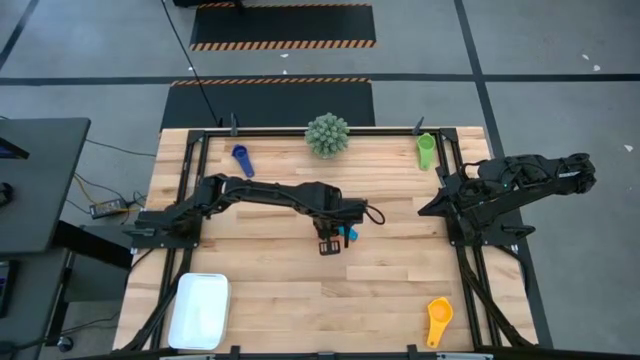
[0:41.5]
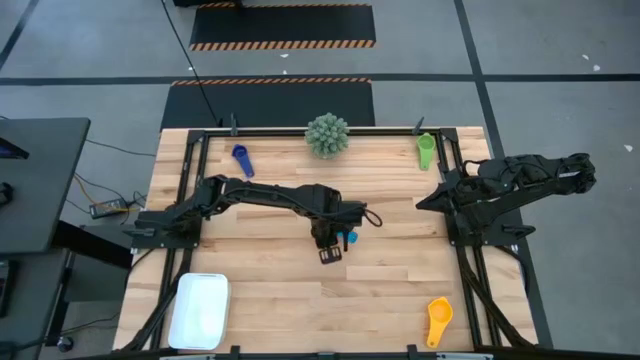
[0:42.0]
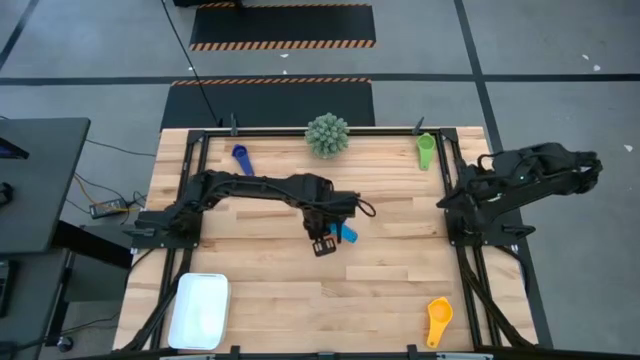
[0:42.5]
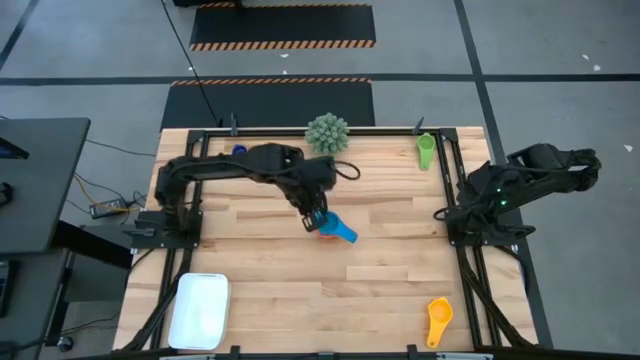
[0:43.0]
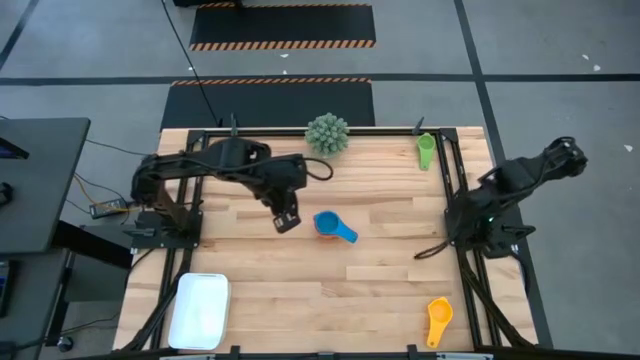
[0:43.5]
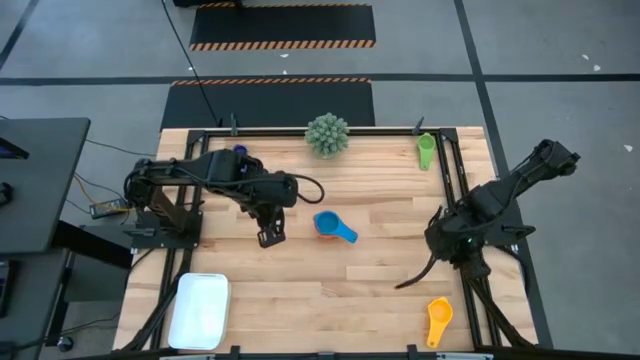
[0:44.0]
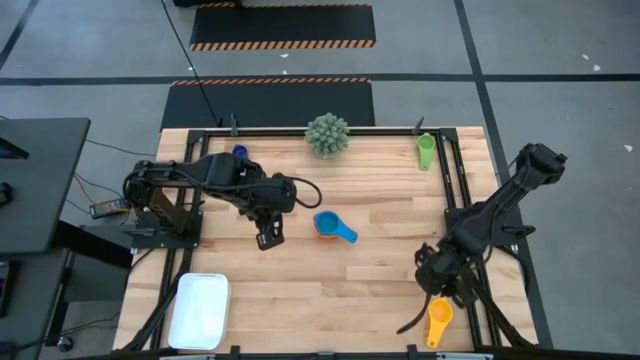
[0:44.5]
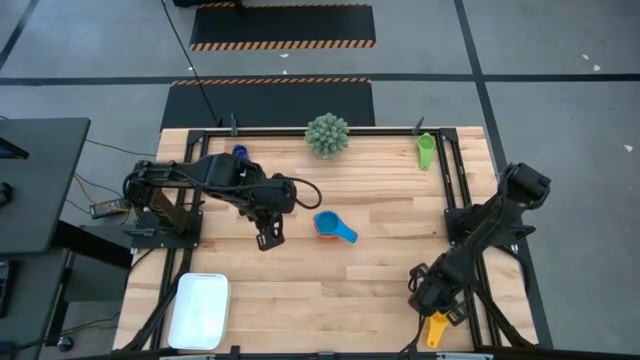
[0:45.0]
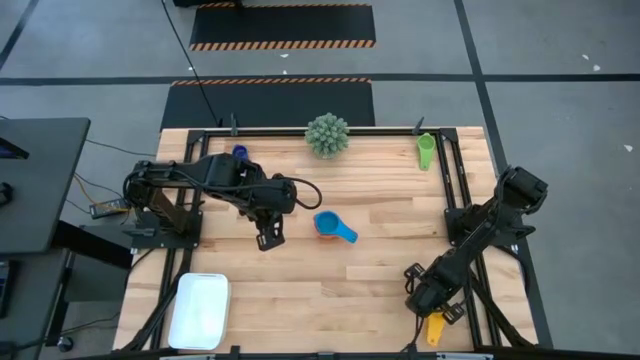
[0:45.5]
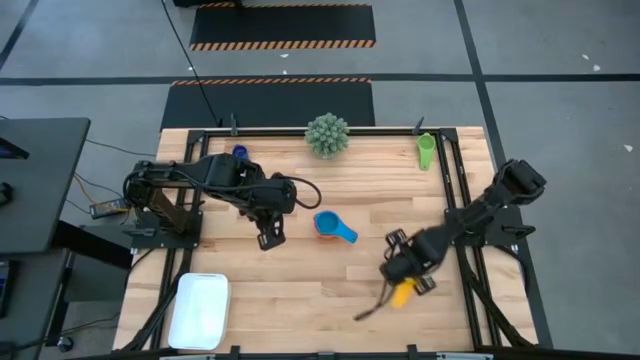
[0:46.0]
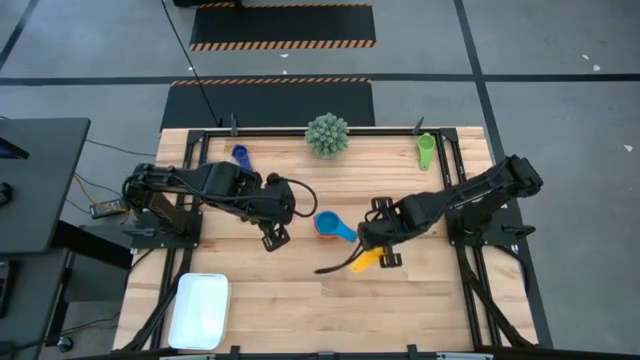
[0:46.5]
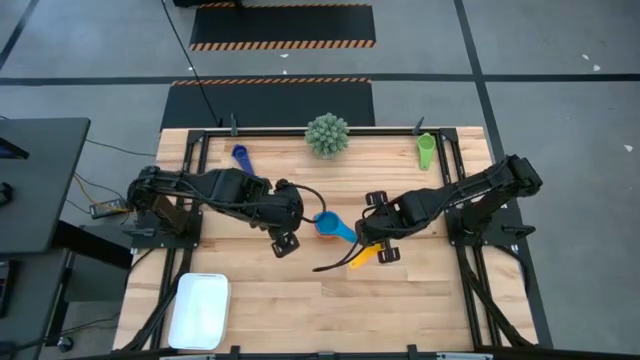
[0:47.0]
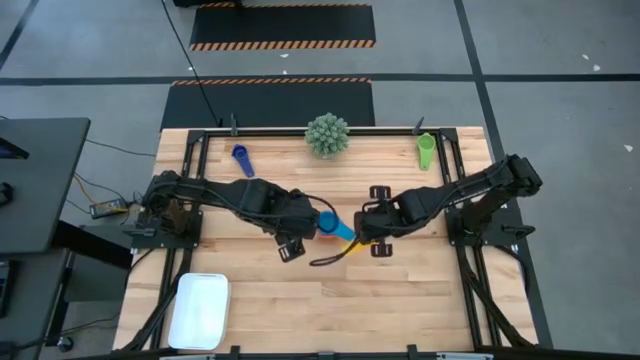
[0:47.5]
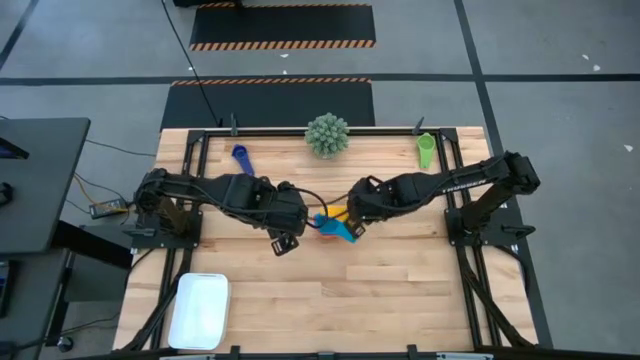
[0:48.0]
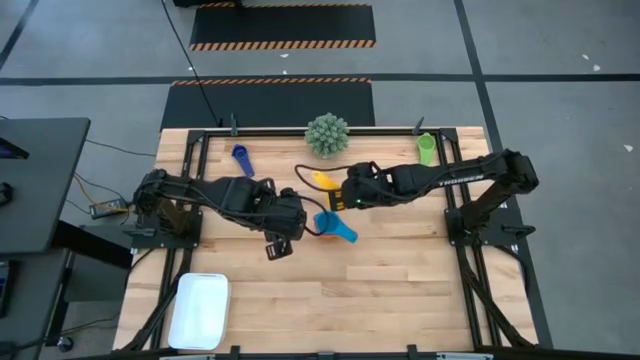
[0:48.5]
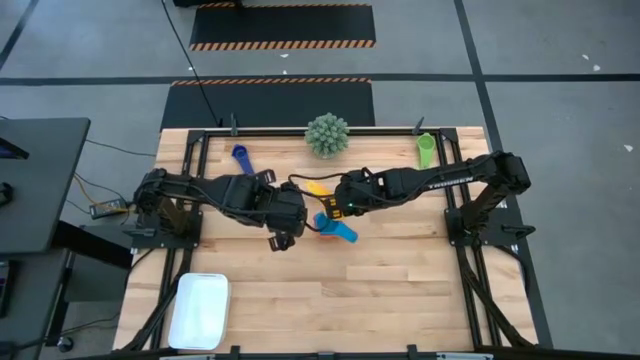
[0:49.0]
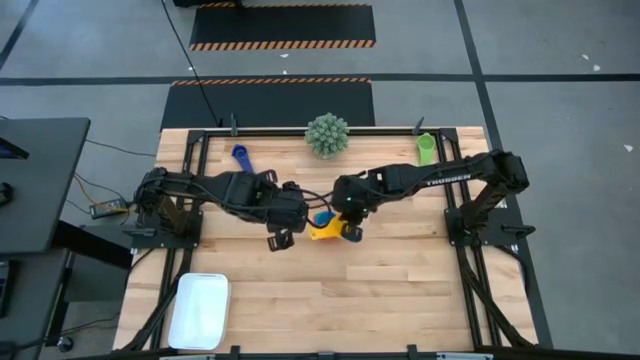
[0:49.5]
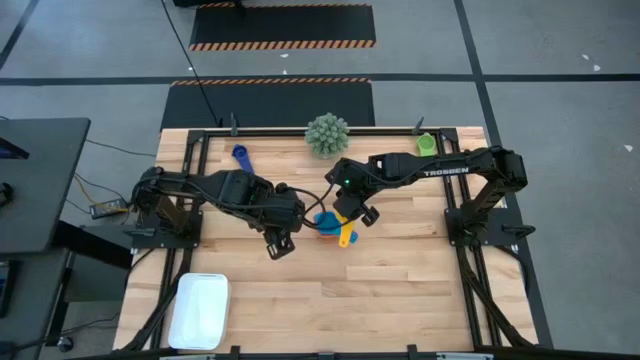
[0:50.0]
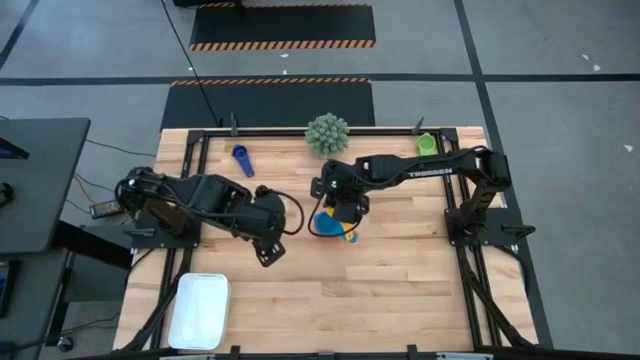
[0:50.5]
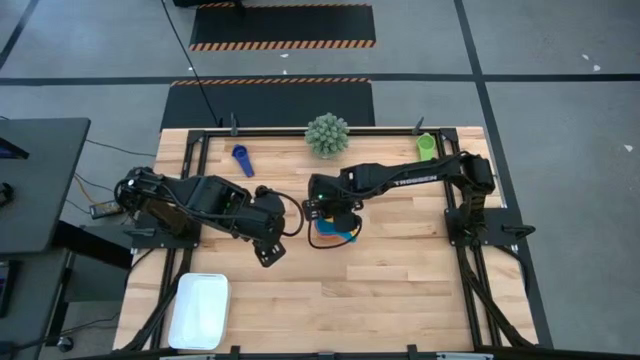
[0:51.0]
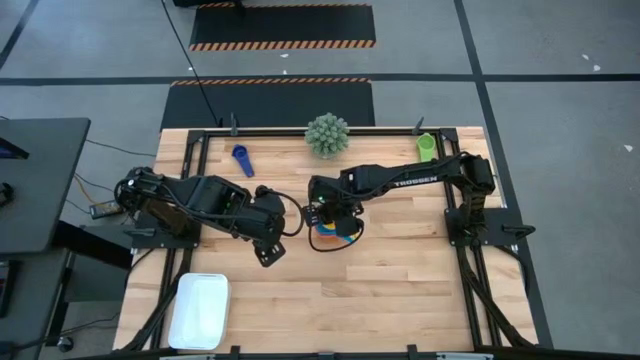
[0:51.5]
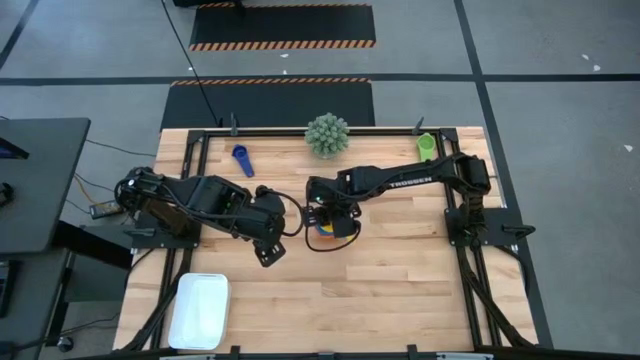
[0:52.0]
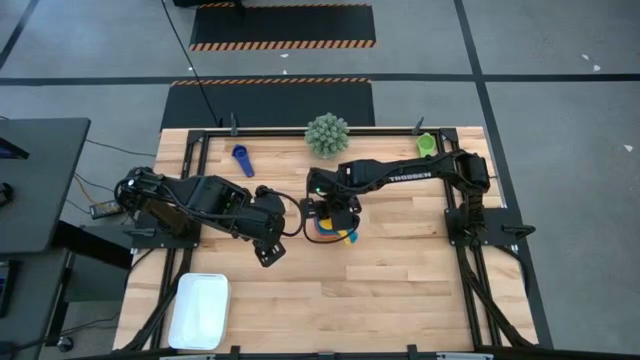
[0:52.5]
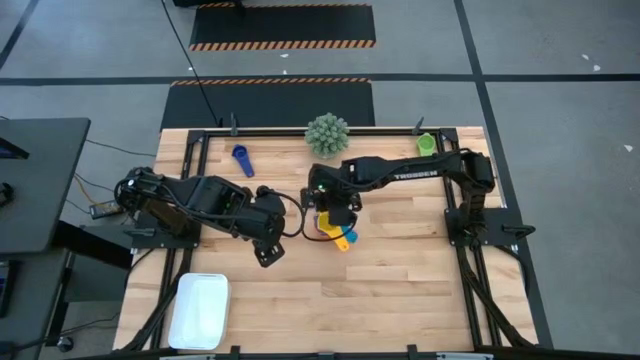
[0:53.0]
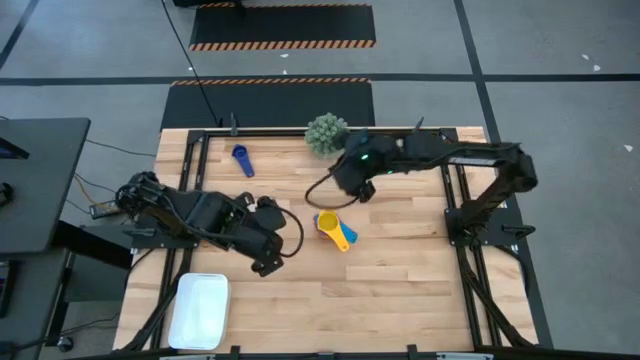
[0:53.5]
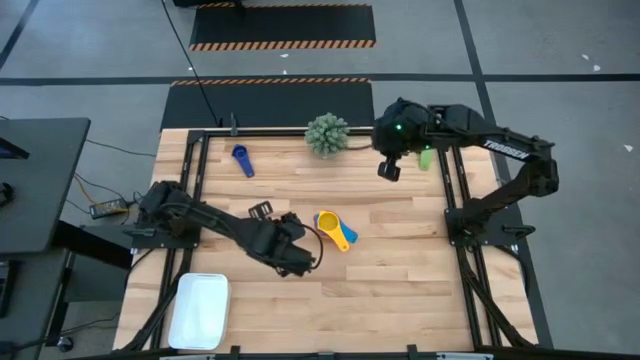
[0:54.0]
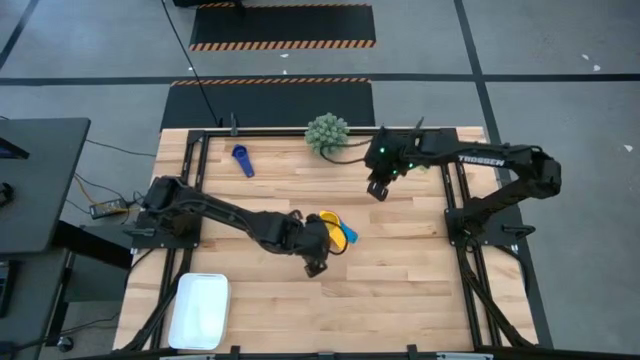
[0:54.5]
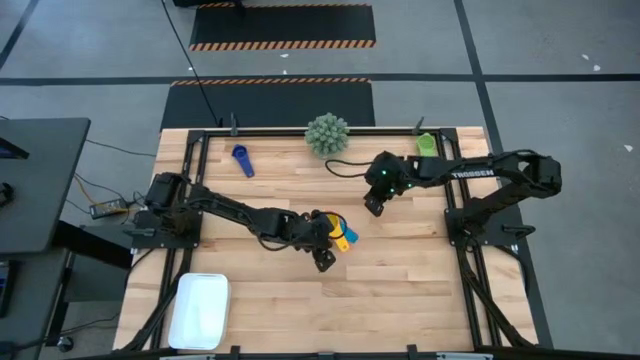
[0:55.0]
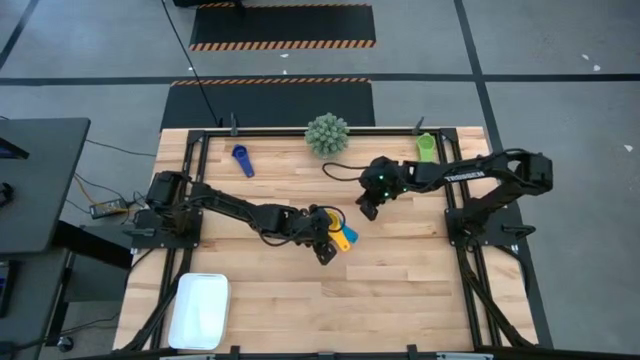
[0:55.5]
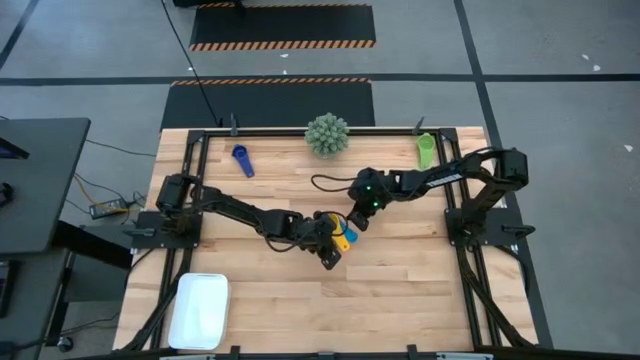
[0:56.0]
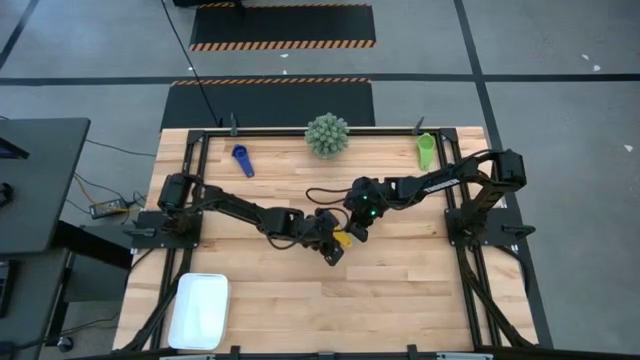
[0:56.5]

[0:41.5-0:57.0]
Task: Nest measuring cups in basket
Stack the yellow measuring cup on top of the light blue measuring cup

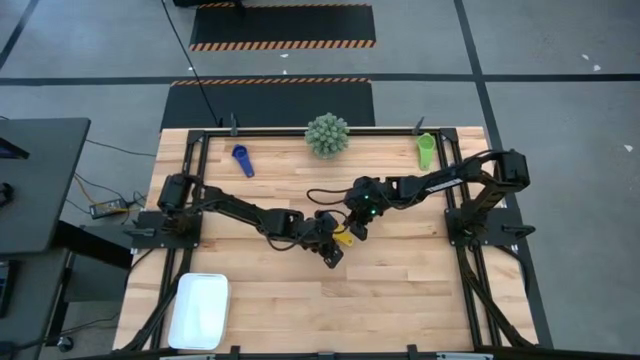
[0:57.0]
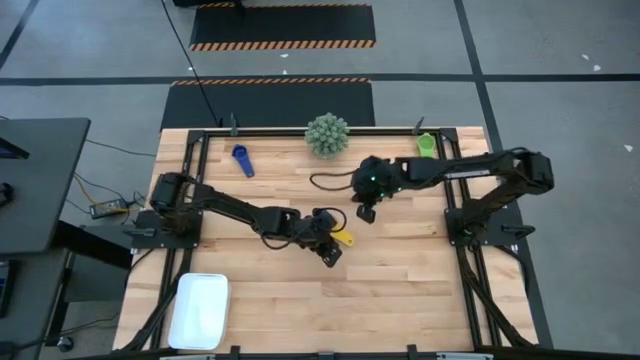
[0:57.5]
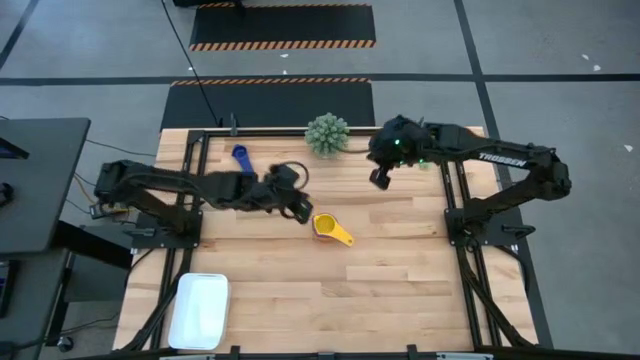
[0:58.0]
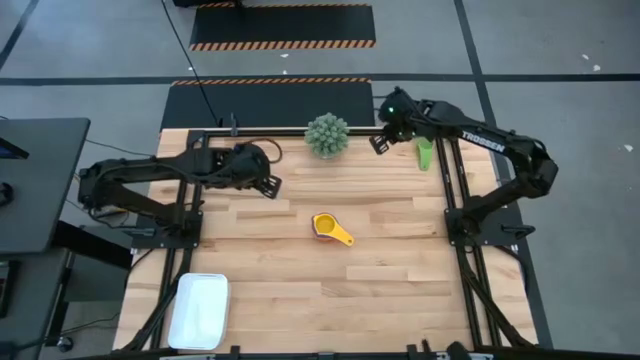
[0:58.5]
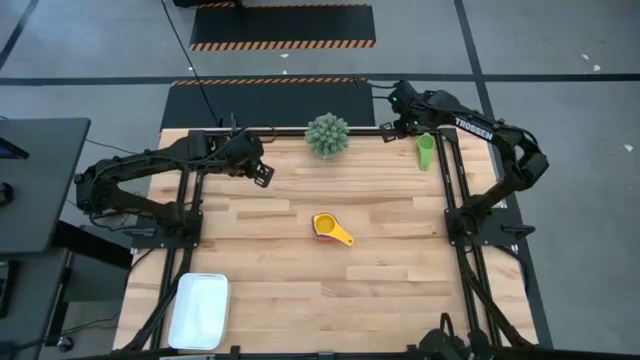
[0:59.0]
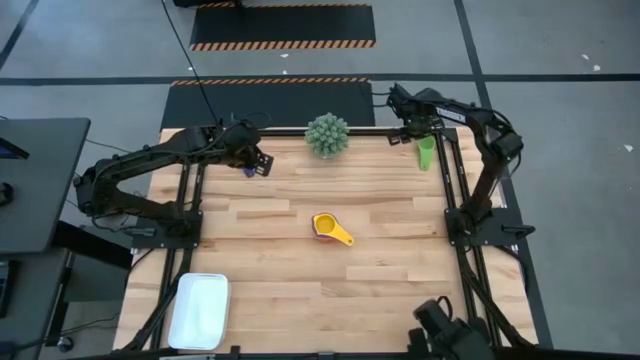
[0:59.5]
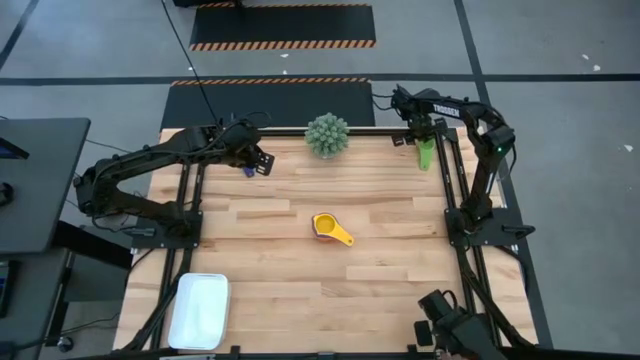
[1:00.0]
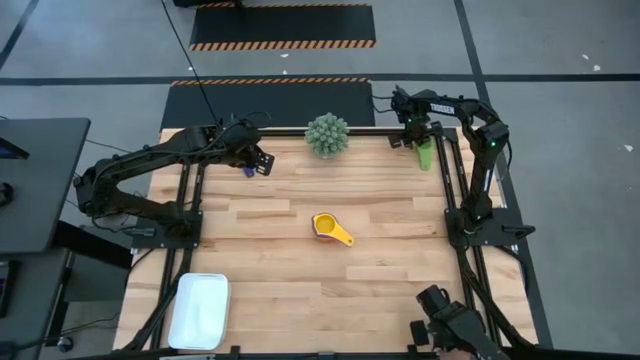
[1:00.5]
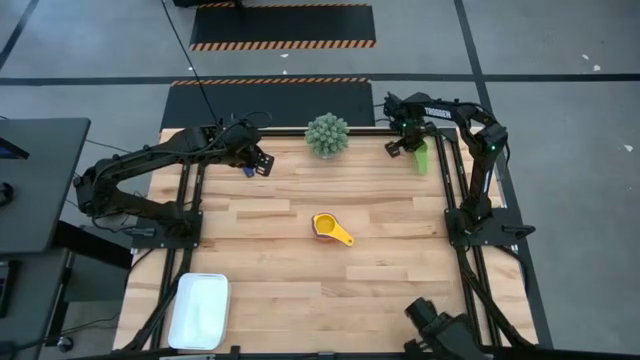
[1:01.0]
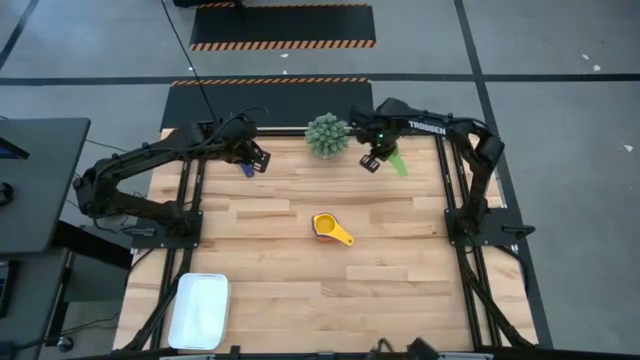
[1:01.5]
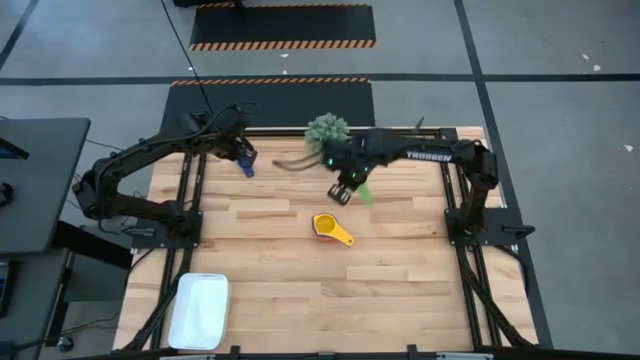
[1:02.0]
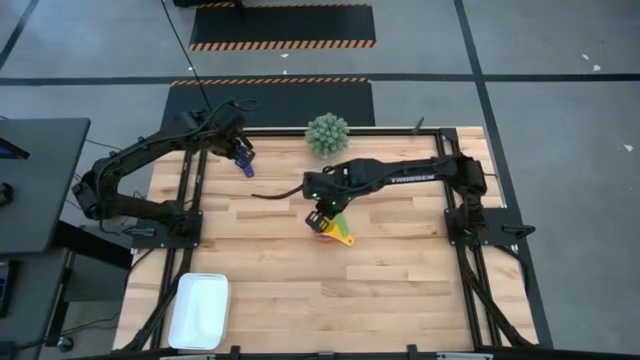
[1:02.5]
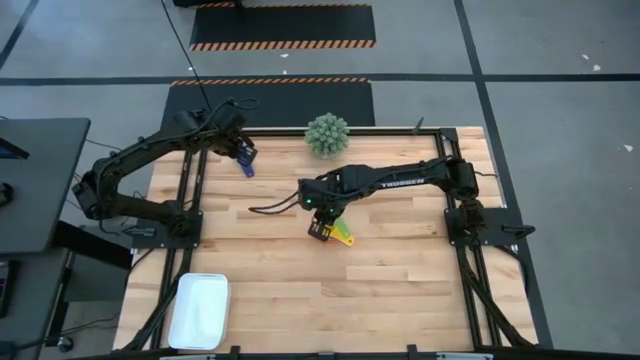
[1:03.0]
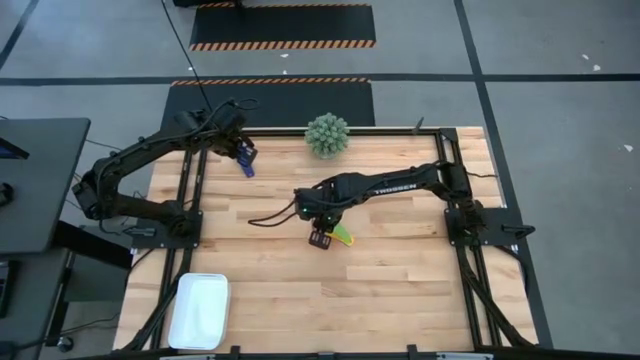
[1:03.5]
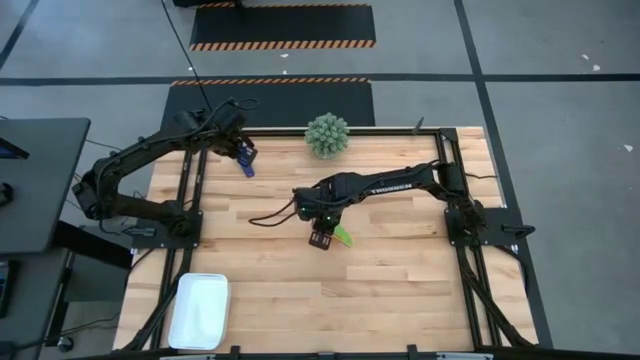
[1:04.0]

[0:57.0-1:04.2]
Stack the green measuring cup on top of the yellow measuring cup
